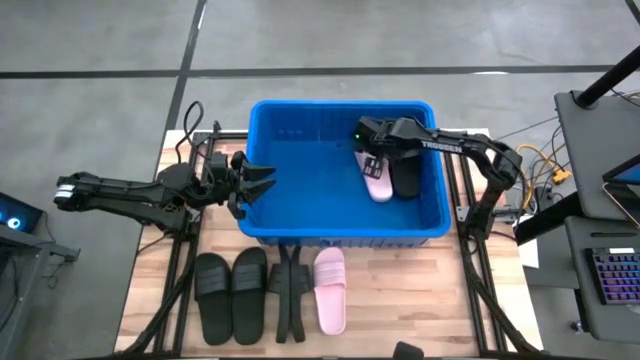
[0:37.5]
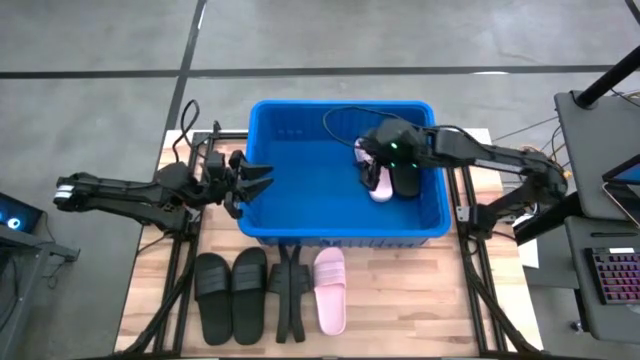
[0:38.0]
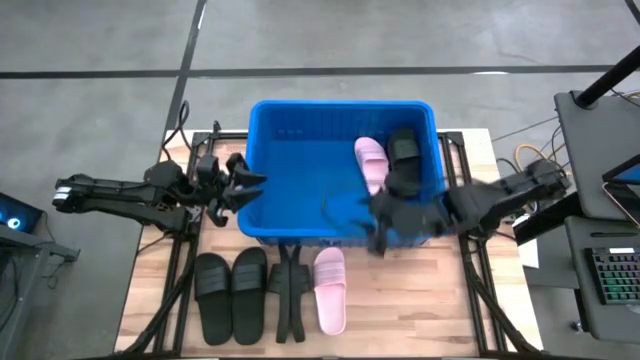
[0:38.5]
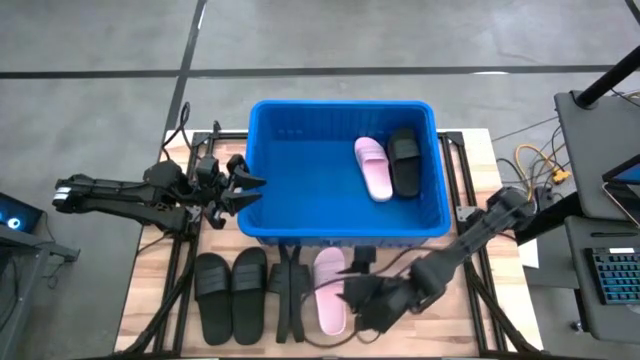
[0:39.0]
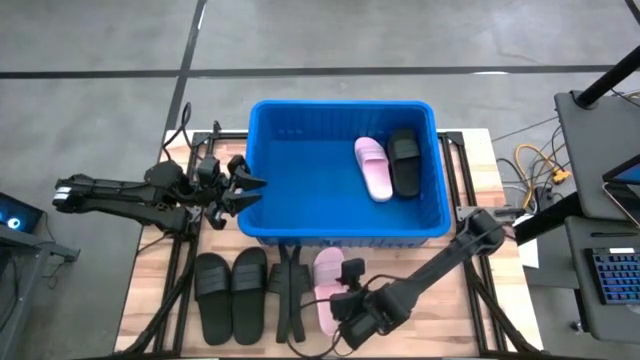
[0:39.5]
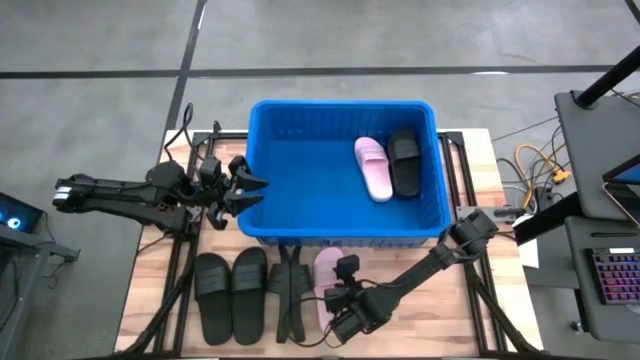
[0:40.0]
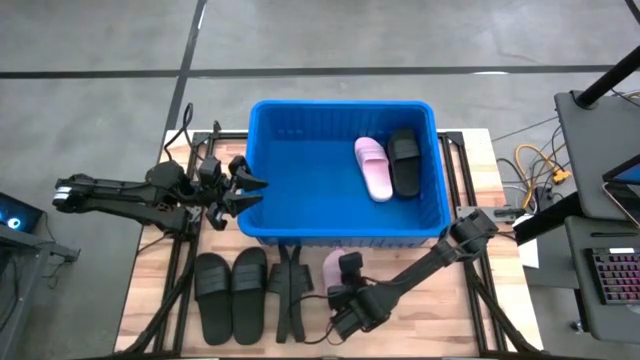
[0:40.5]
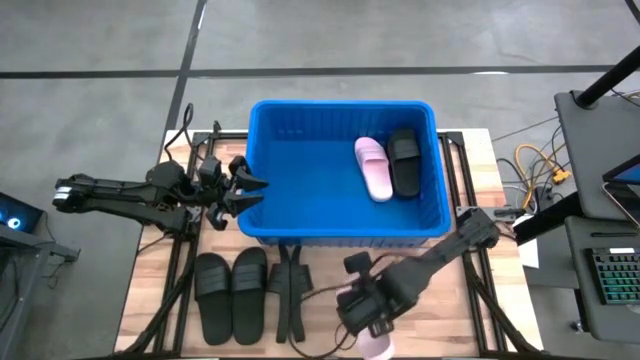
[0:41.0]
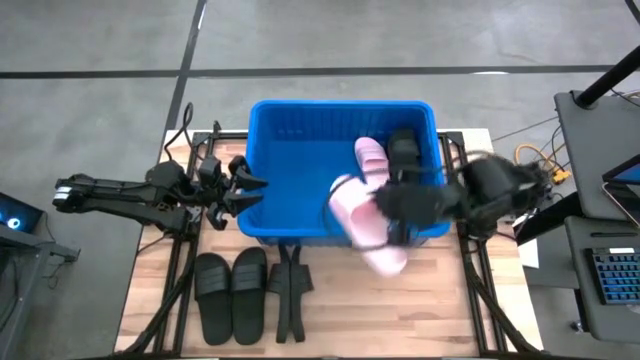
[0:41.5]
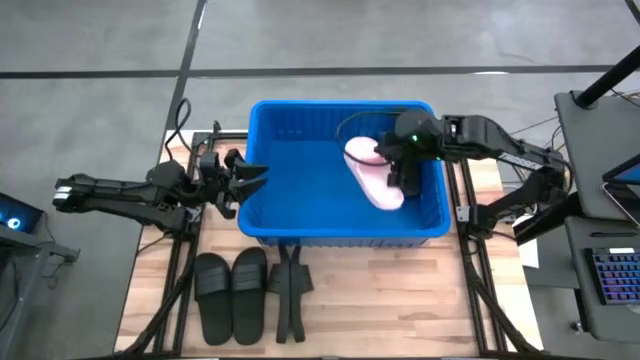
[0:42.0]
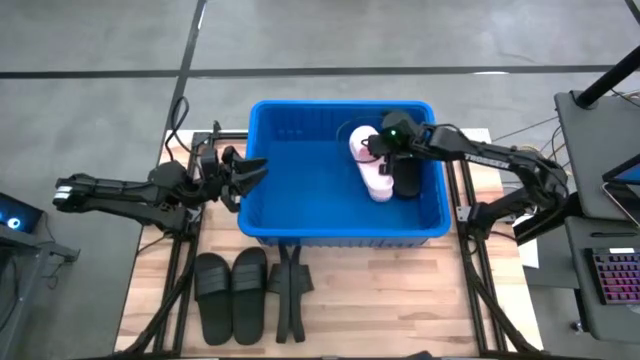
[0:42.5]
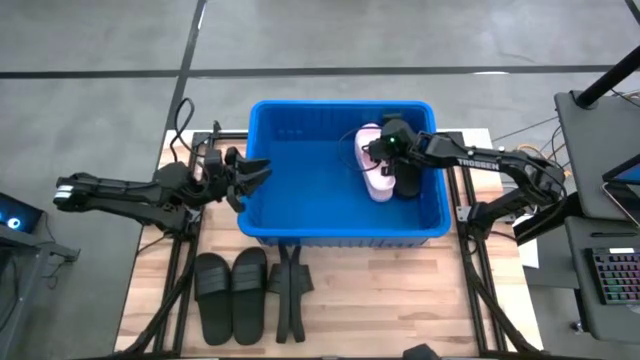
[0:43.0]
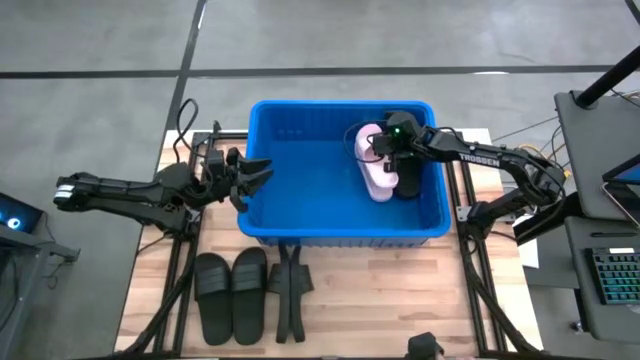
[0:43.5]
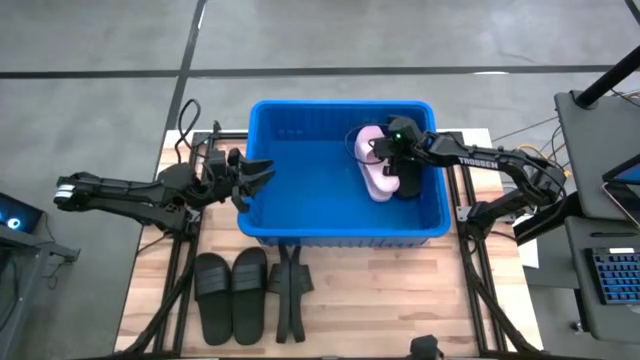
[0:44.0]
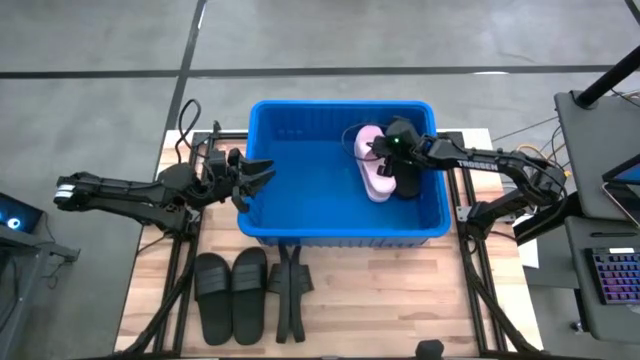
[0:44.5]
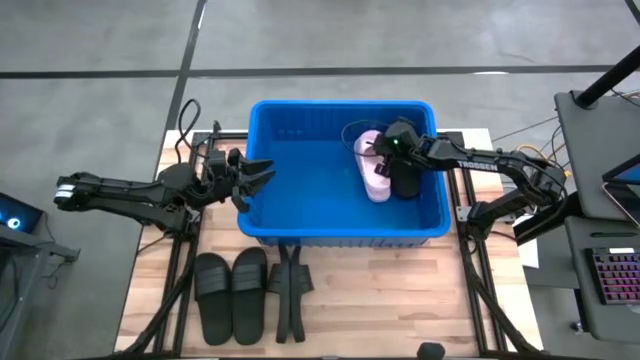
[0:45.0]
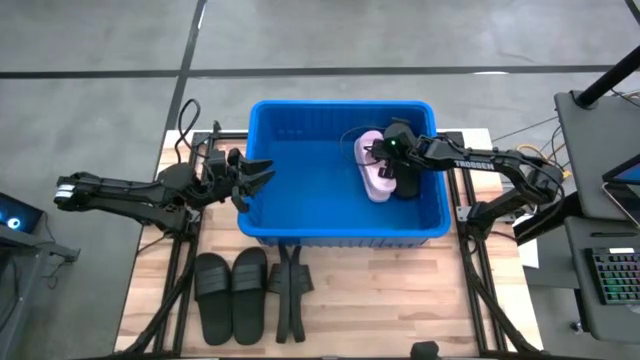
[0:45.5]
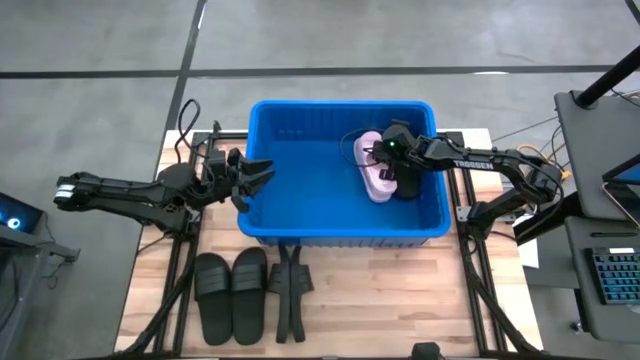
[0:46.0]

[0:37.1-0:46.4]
Task: Pick and place slides into bin
Put the pink slide into the blue bin

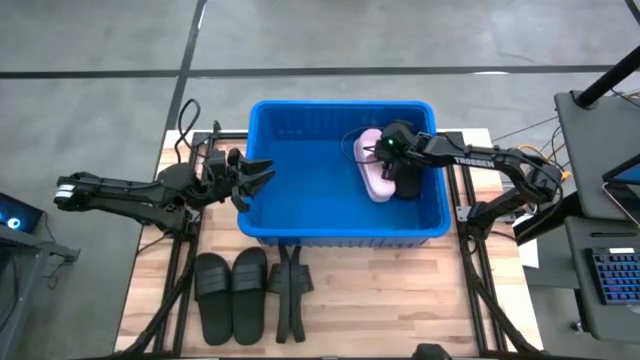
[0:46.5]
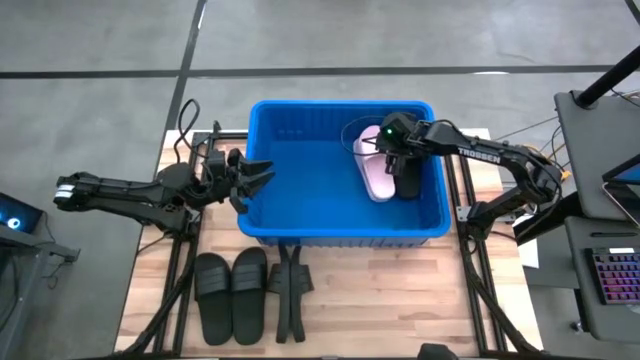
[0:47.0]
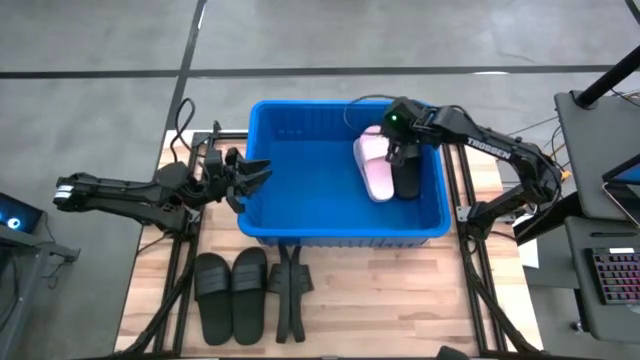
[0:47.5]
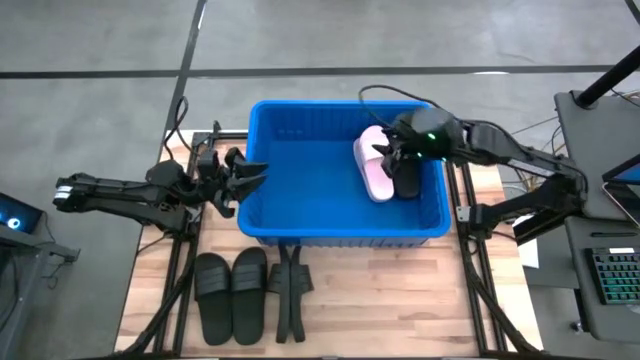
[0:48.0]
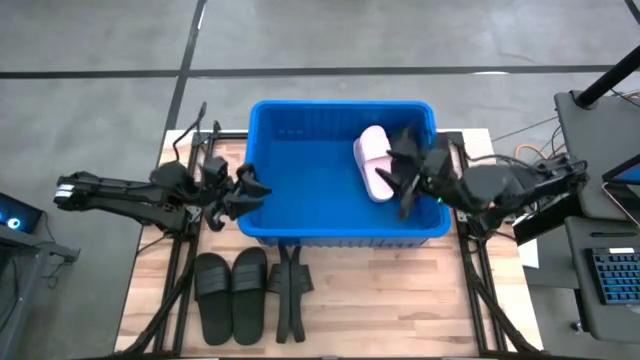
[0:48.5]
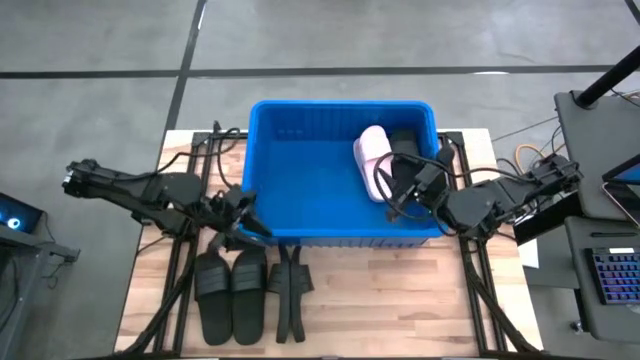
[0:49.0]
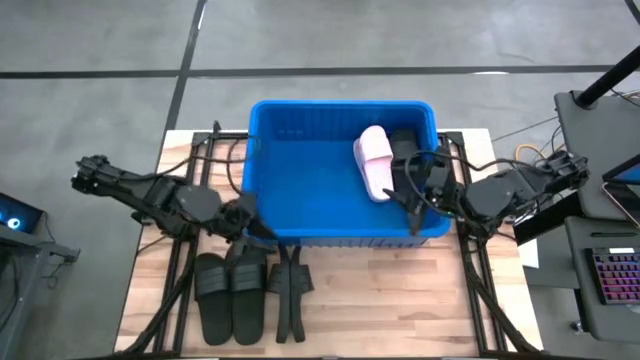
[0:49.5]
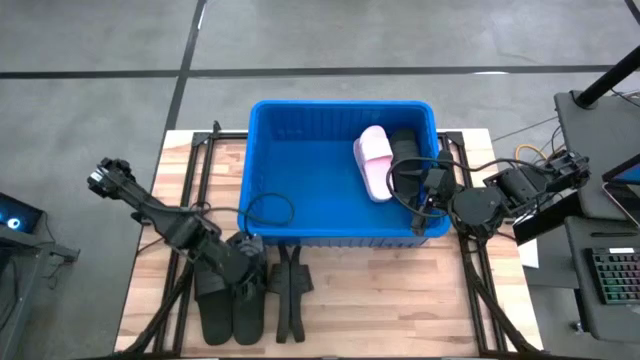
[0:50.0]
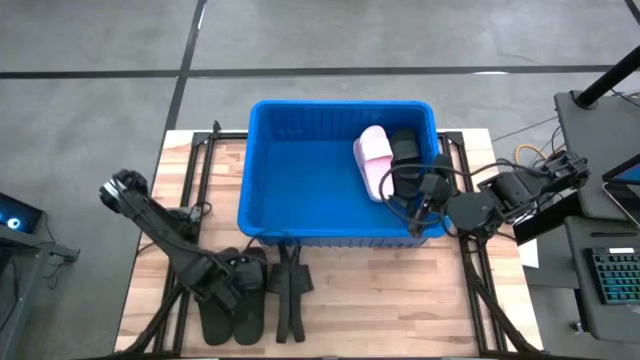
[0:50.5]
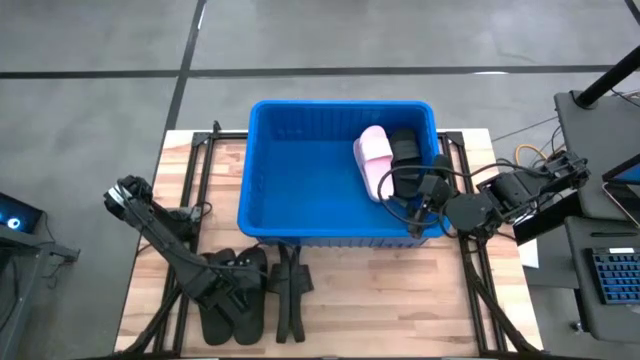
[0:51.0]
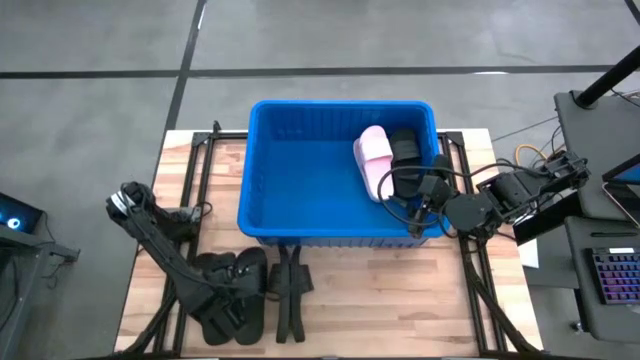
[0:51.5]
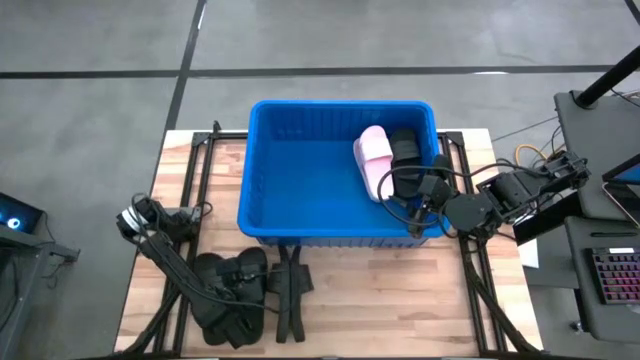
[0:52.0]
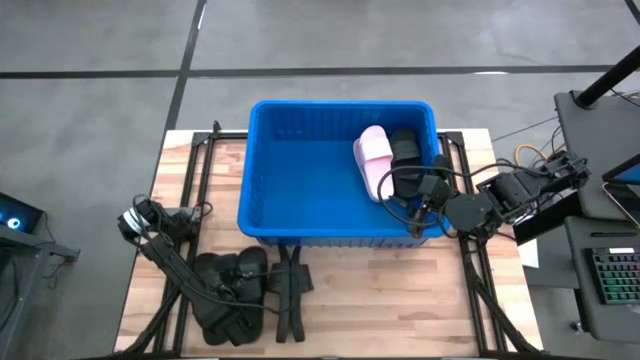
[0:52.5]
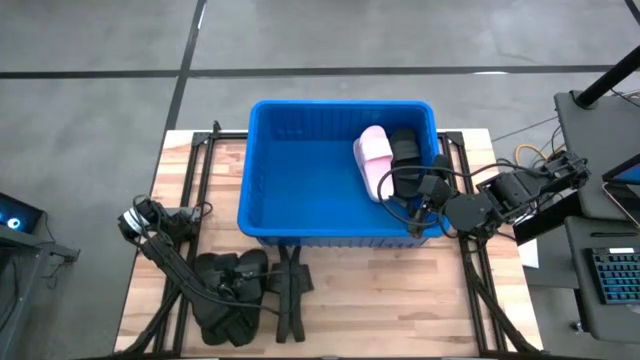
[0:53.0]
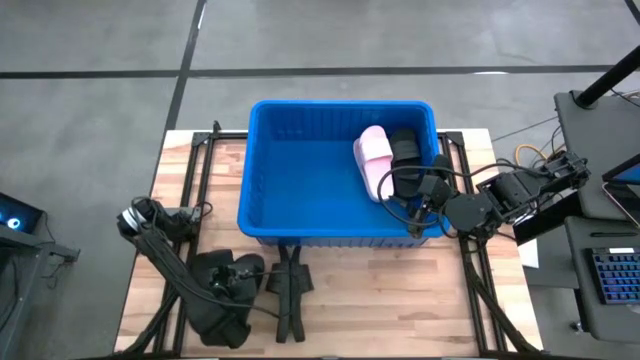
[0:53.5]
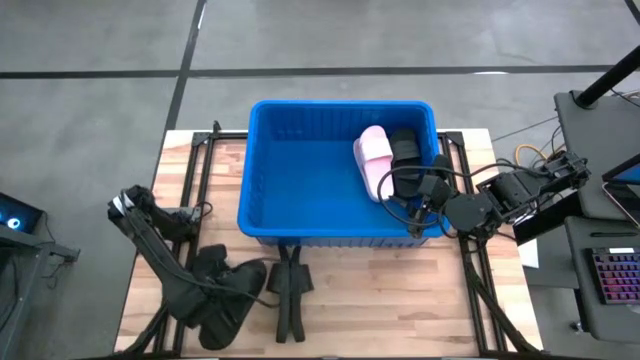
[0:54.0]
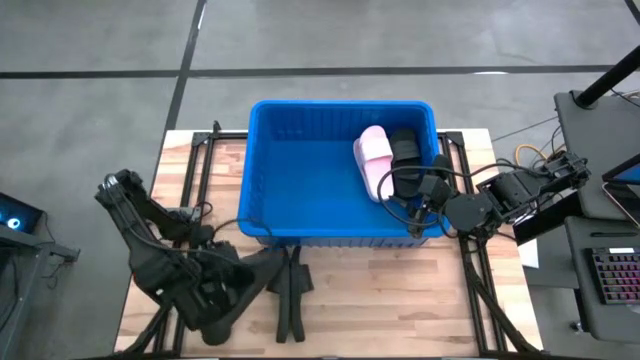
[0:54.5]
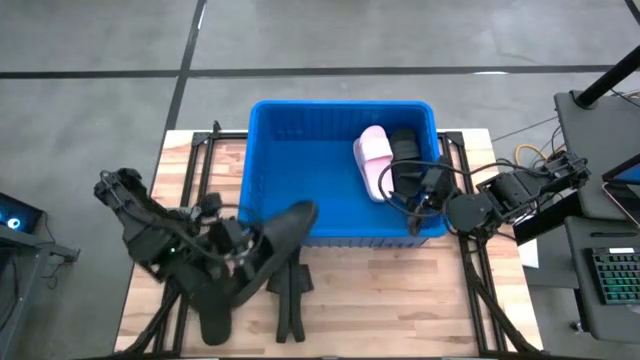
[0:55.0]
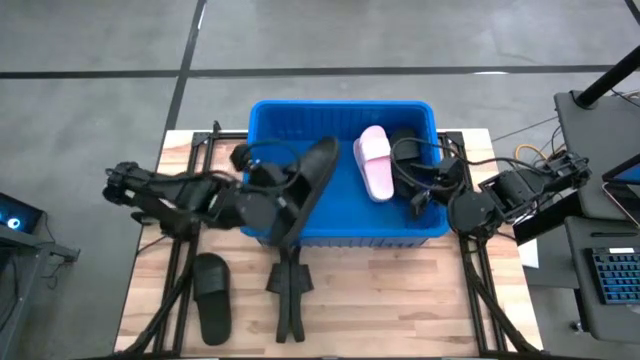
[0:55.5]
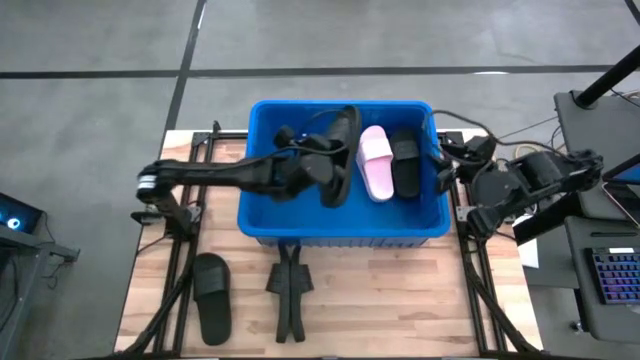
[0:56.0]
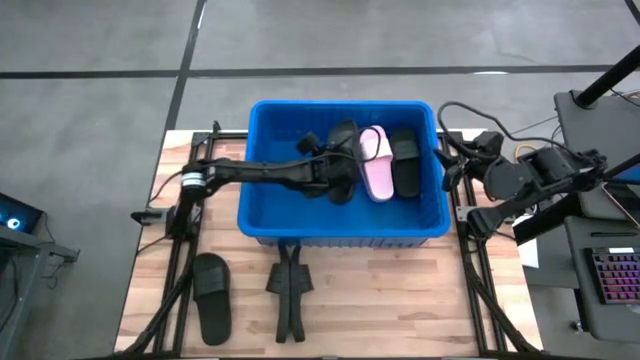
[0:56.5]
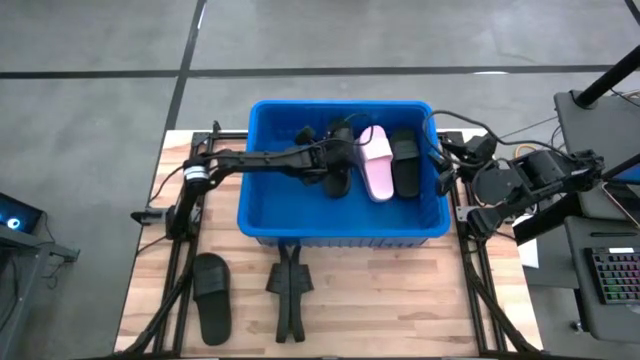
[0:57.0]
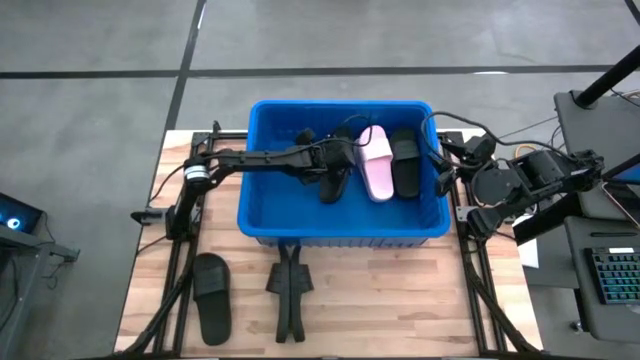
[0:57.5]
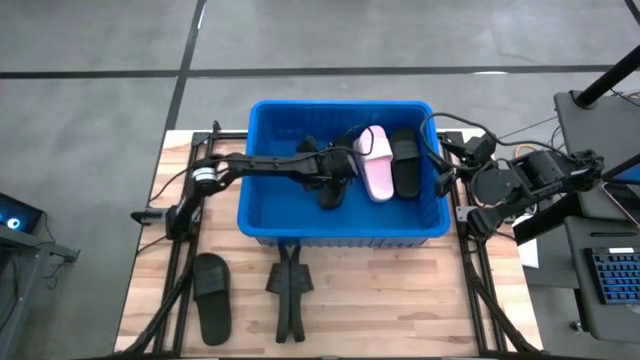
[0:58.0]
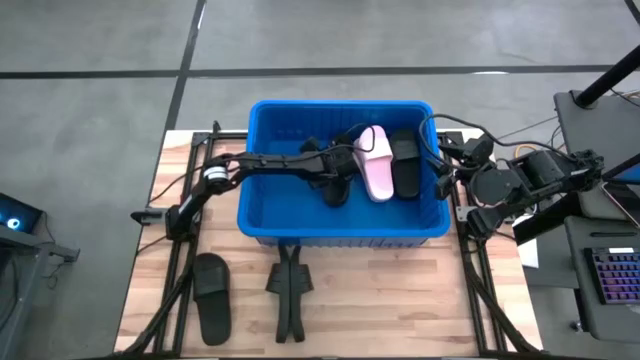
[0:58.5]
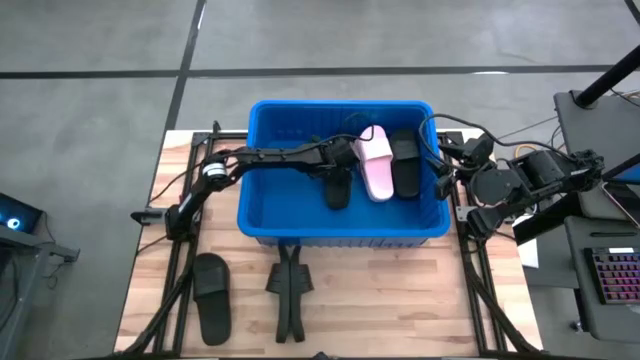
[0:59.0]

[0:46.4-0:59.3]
Put the black slide into the blue bin

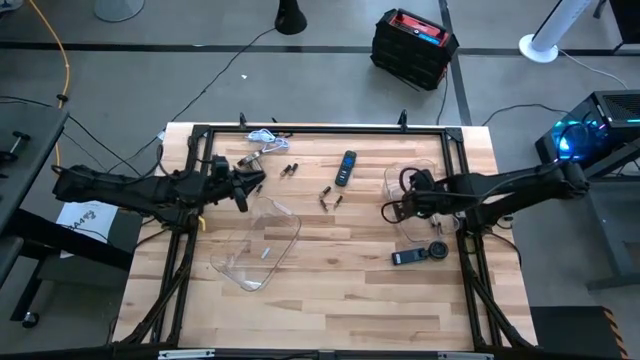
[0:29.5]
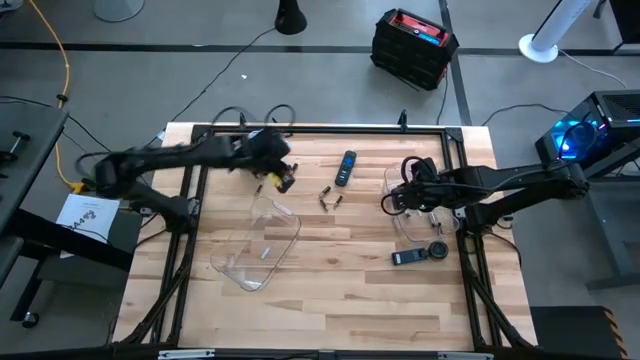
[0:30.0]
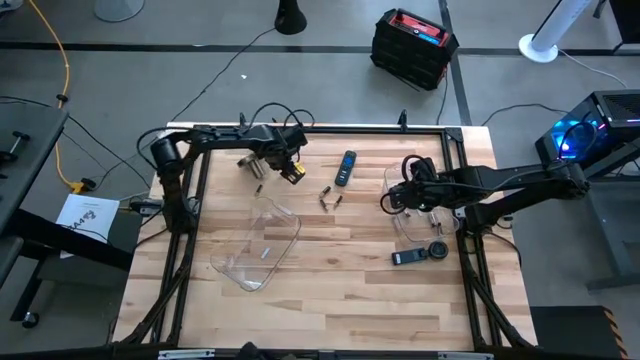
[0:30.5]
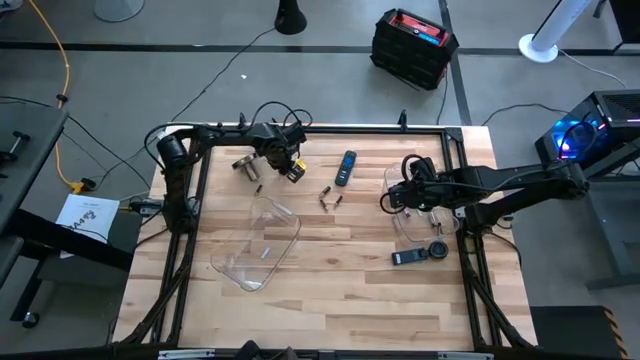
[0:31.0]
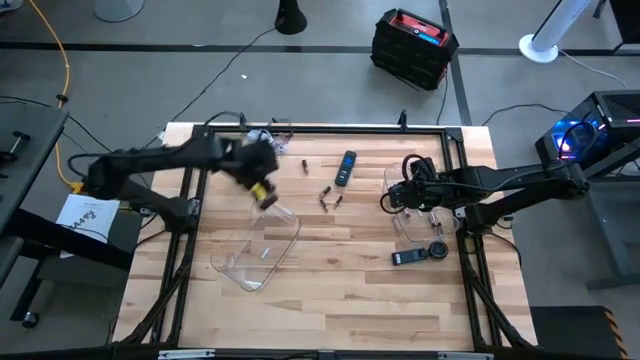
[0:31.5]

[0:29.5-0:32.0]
Task: Sort batteries
Put the white battery into the right transparent bin
